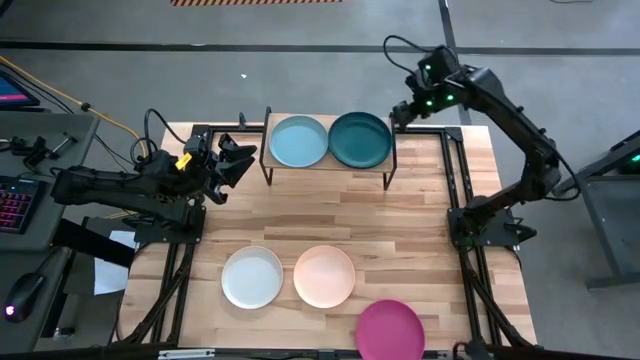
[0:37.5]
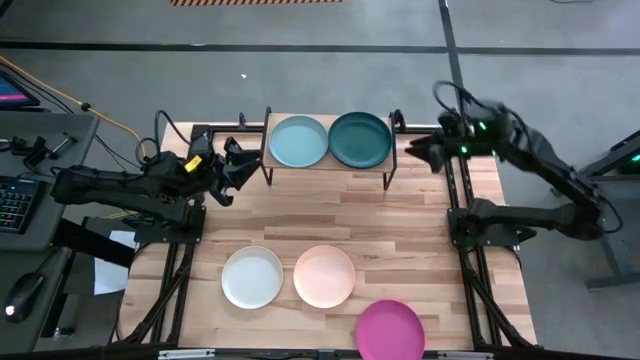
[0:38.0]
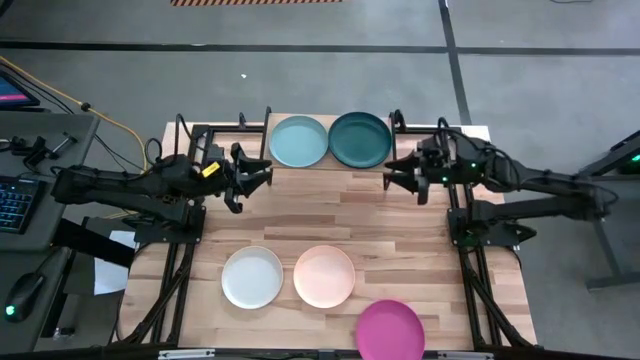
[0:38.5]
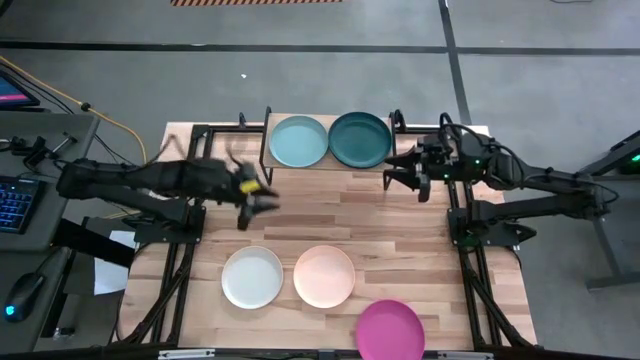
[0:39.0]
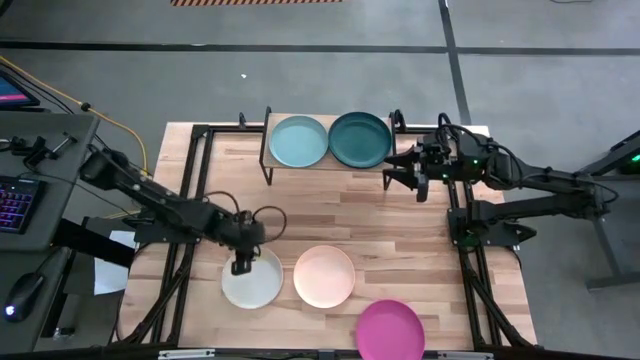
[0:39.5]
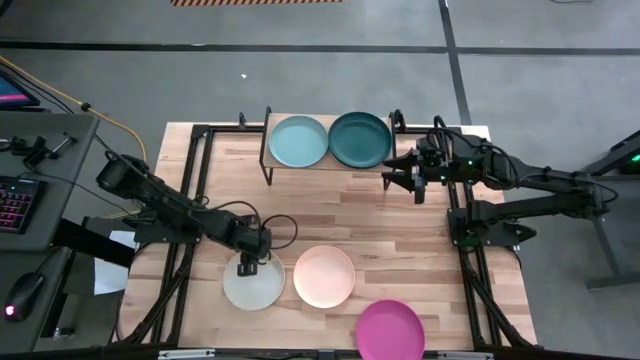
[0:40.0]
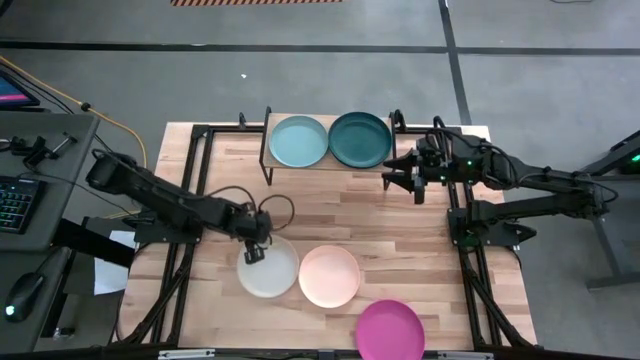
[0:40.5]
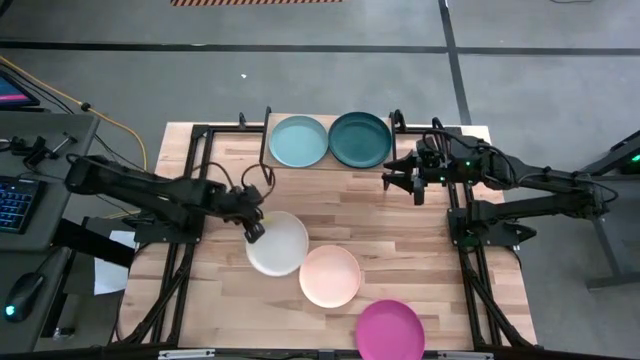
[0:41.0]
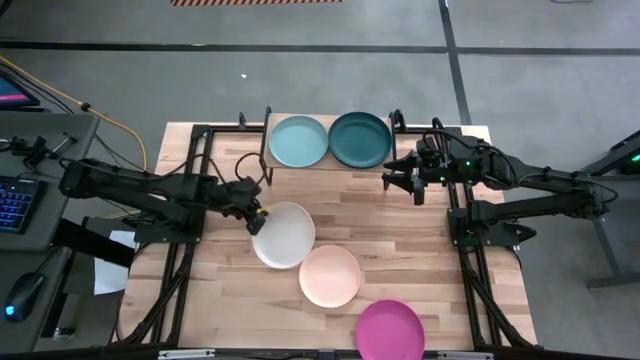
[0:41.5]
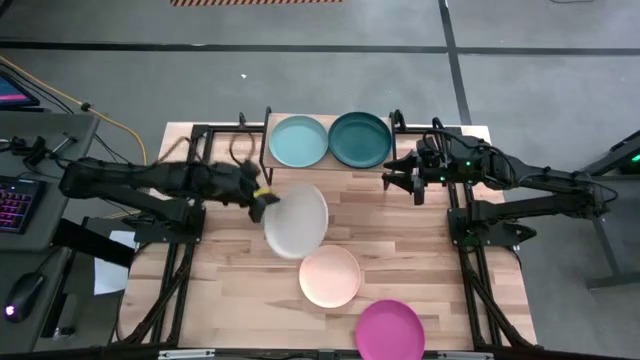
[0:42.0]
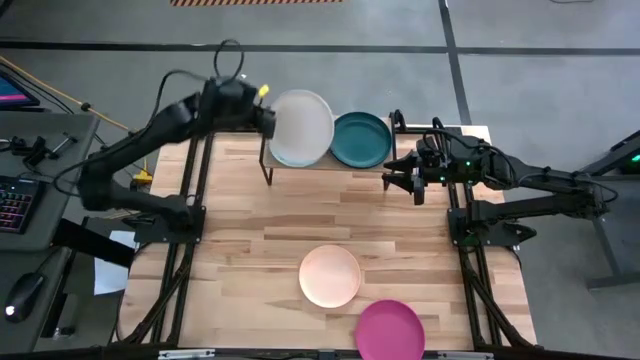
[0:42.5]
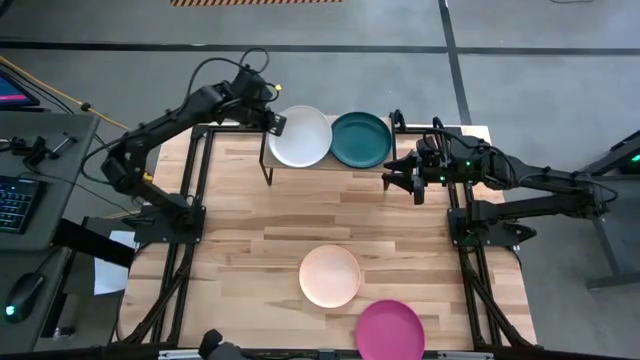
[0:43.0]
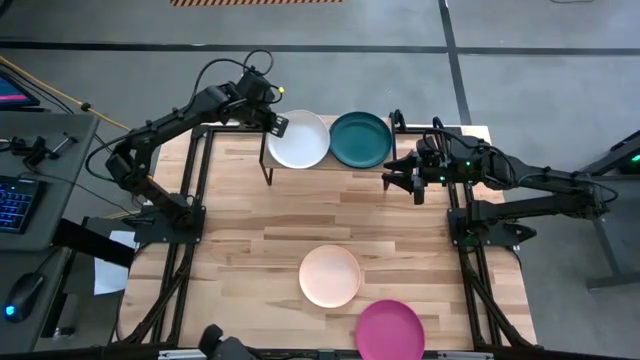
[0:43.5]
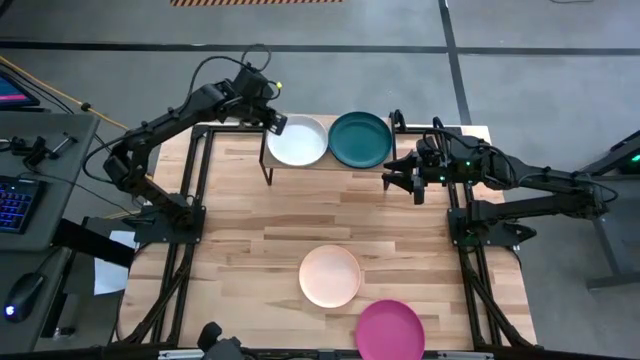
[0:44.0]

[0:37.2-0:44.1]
Task: Place and stack plates onto a shelf
Stack the white plate on top of the blue plate on the shelf

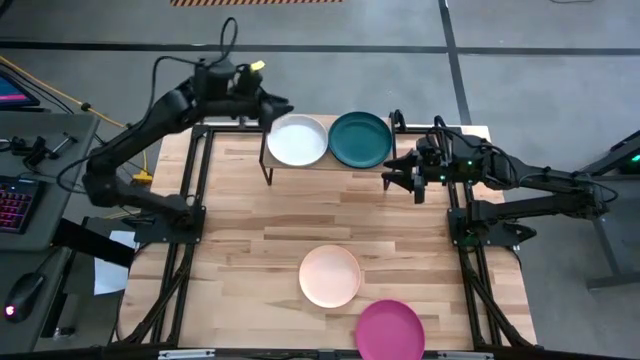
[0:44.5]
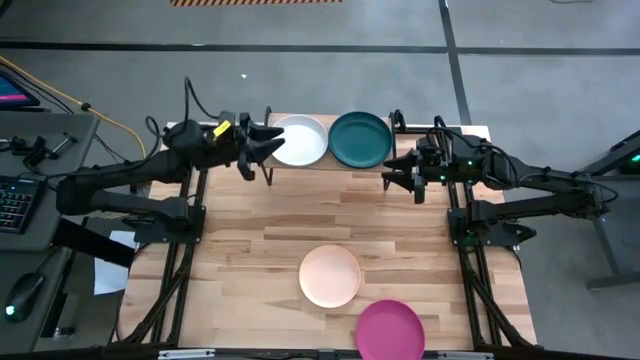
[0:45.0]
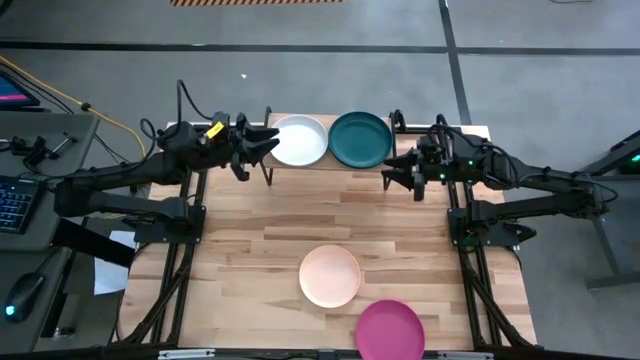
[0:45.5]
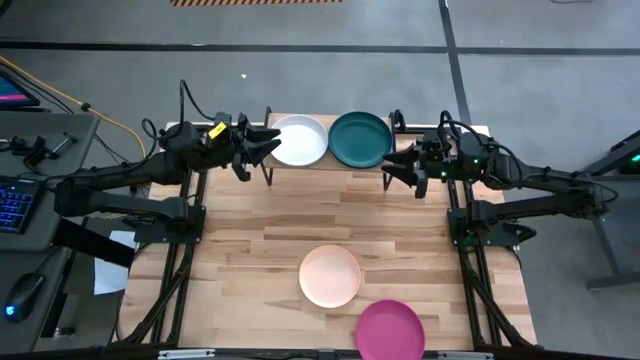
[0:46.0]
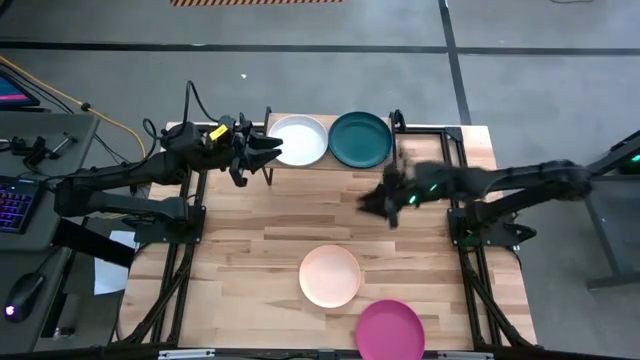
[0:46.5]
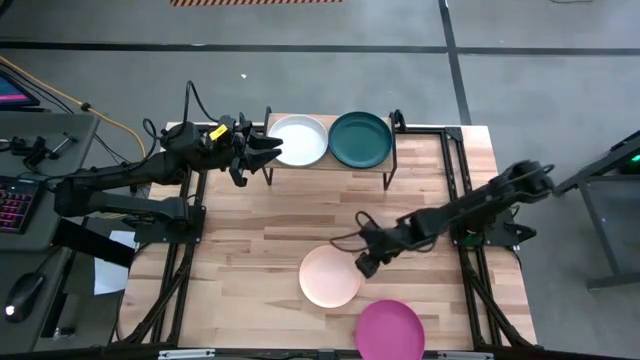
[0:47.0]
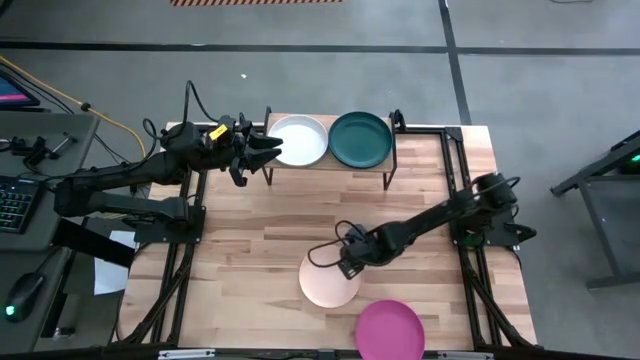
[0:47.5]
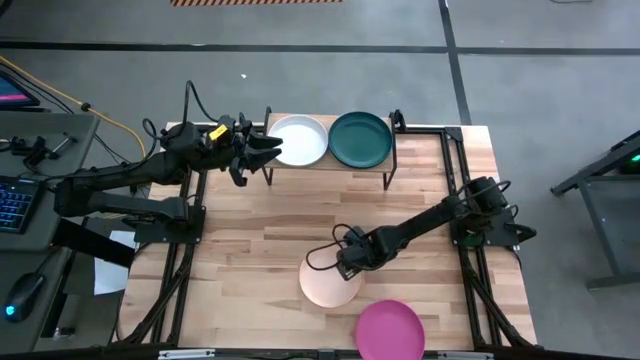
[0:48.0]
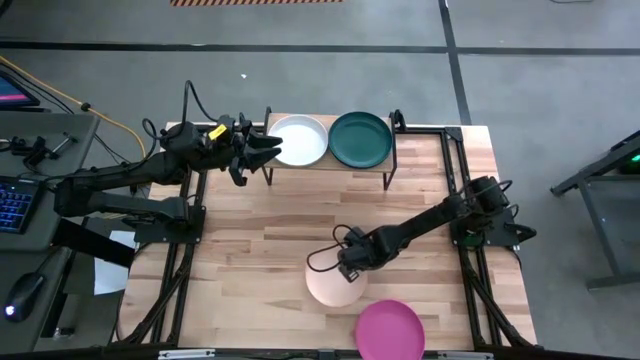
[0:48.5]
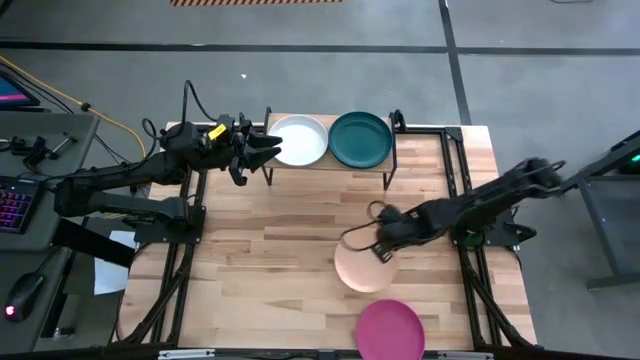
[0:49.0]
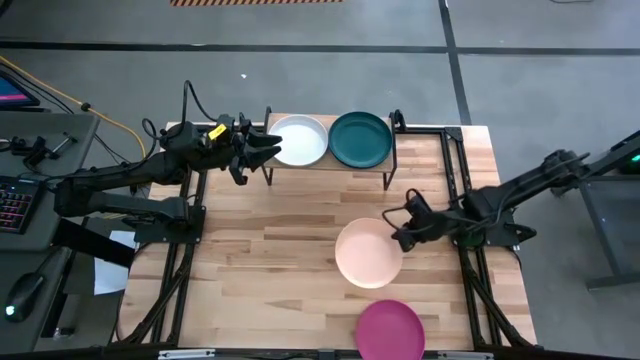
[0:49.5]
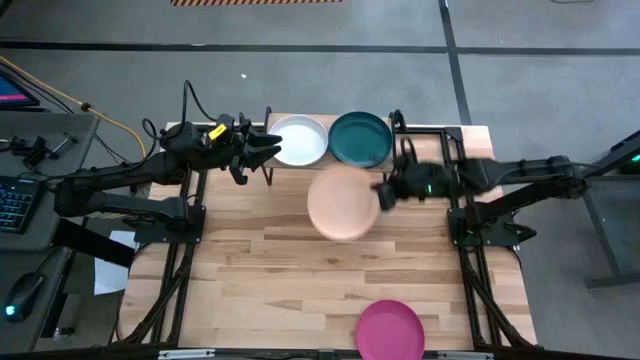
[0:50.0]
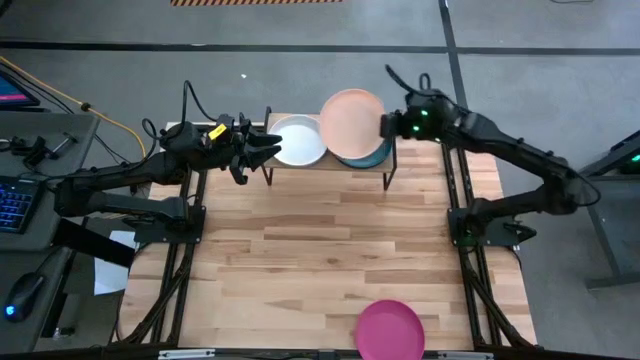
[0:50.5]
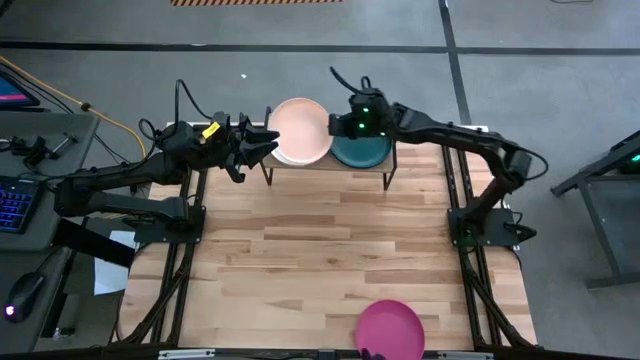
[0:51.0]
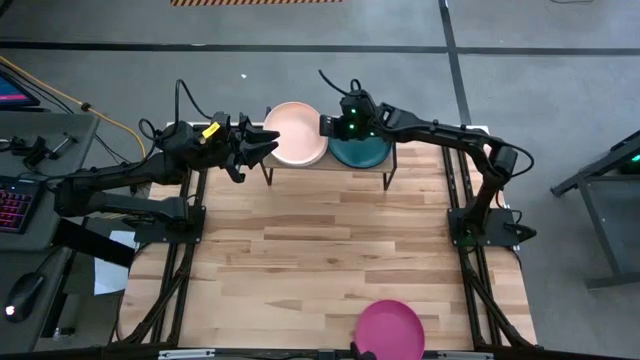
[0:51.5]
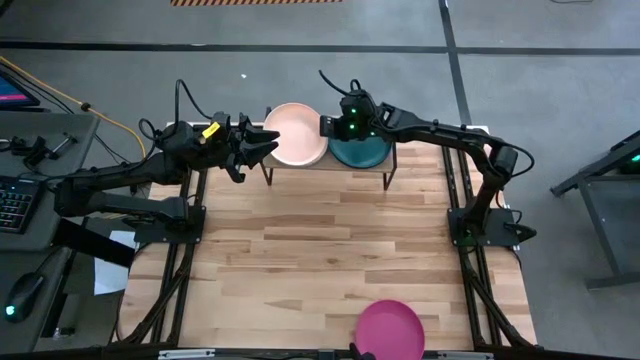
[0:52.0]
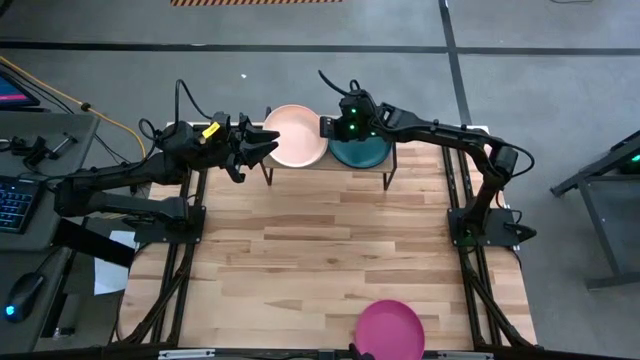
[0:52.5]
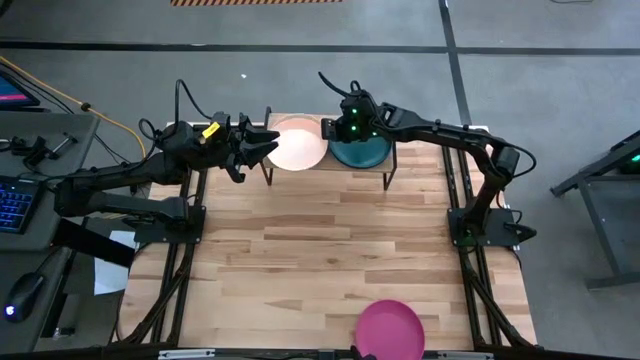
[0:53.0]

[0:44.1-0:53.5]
Stack the light pink plate on top of the white plate on the shelf

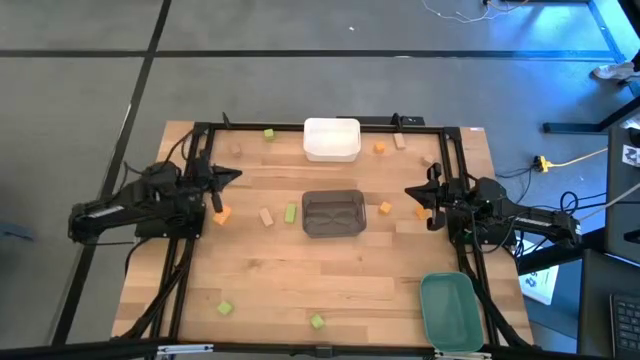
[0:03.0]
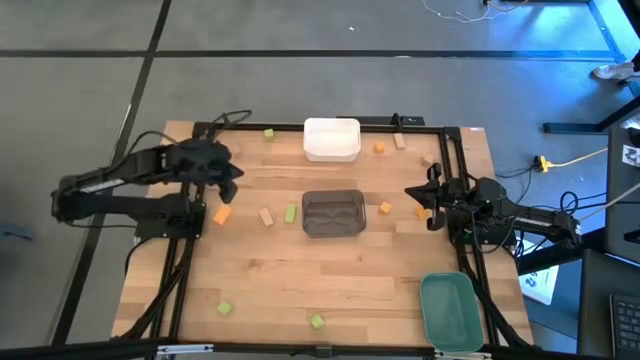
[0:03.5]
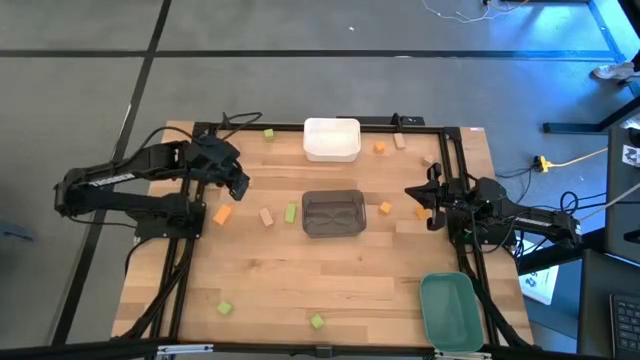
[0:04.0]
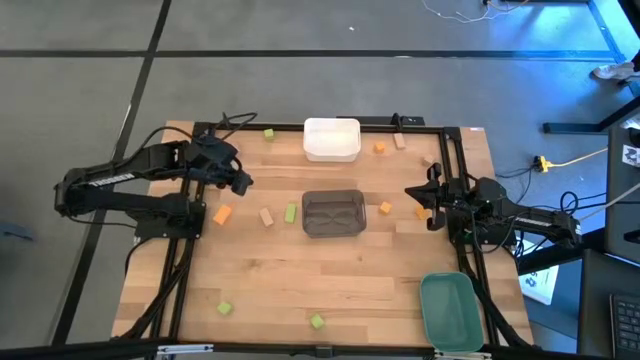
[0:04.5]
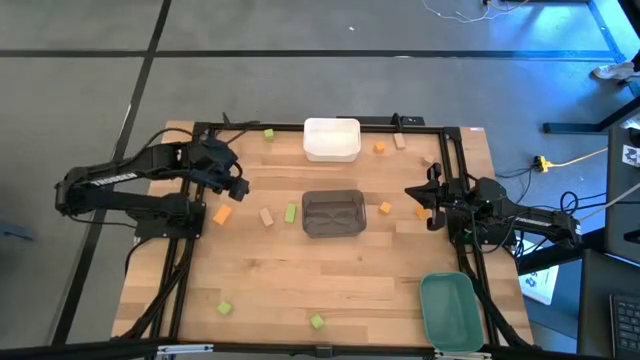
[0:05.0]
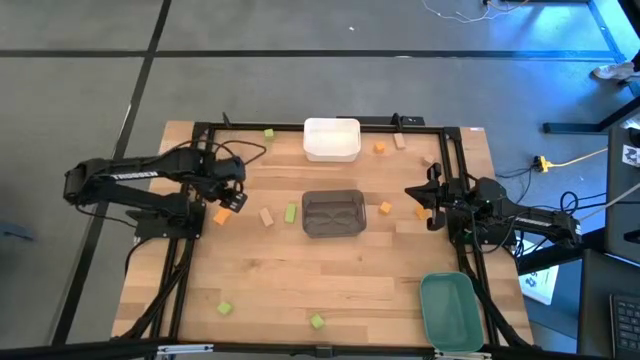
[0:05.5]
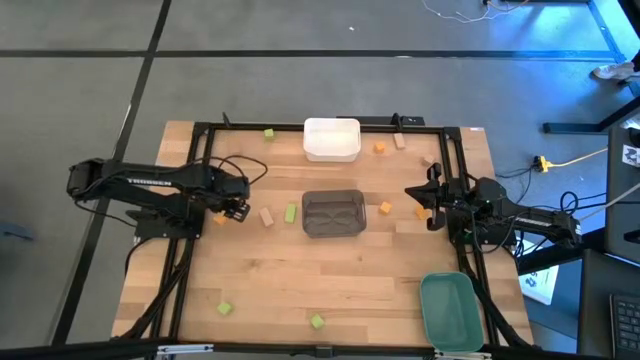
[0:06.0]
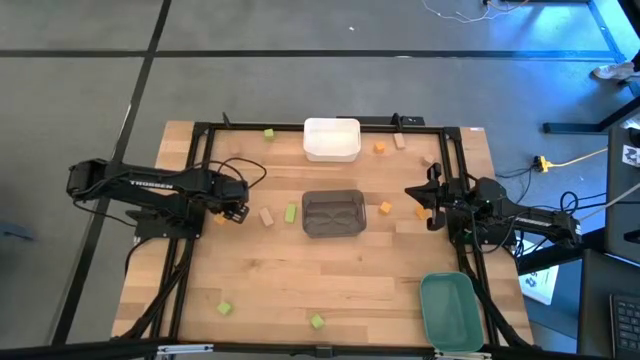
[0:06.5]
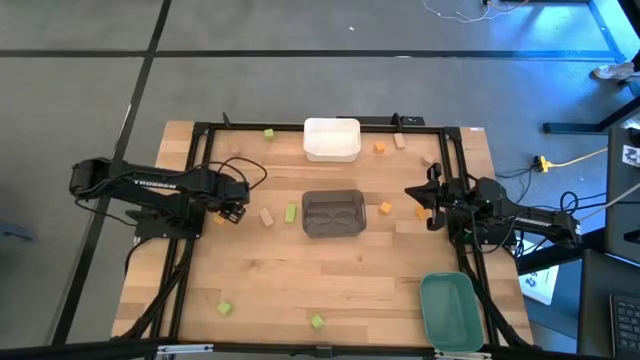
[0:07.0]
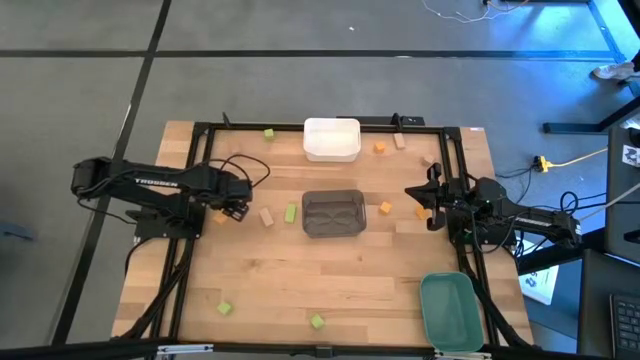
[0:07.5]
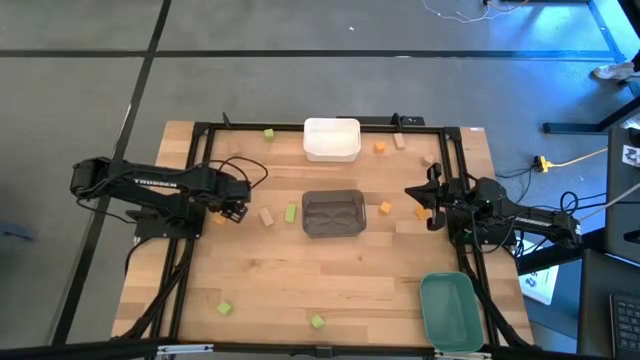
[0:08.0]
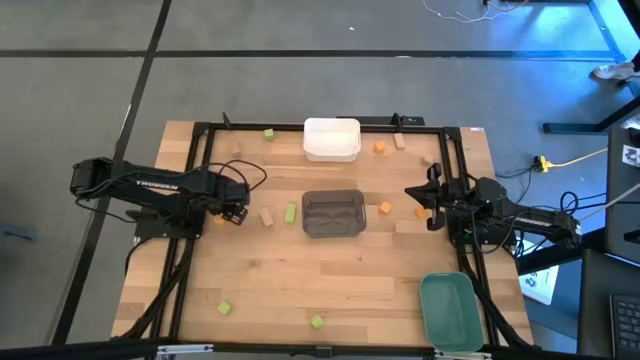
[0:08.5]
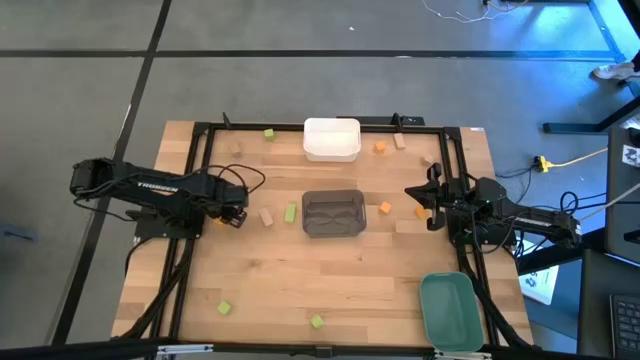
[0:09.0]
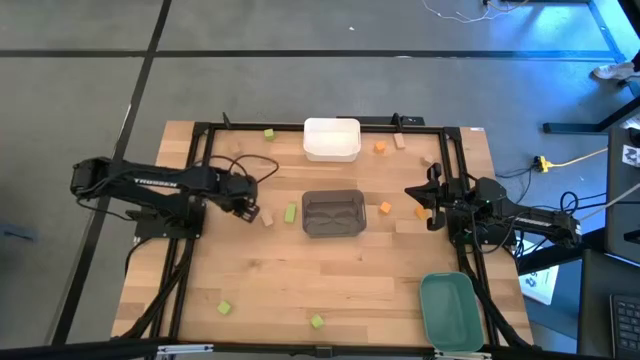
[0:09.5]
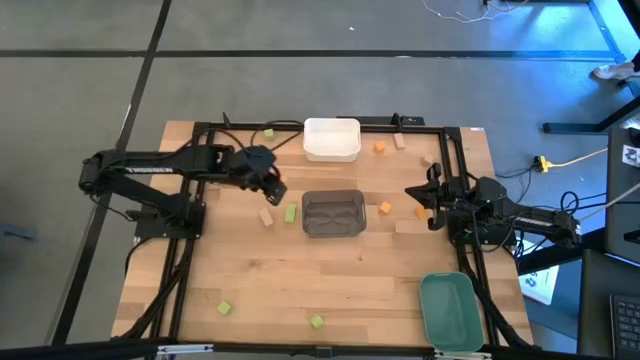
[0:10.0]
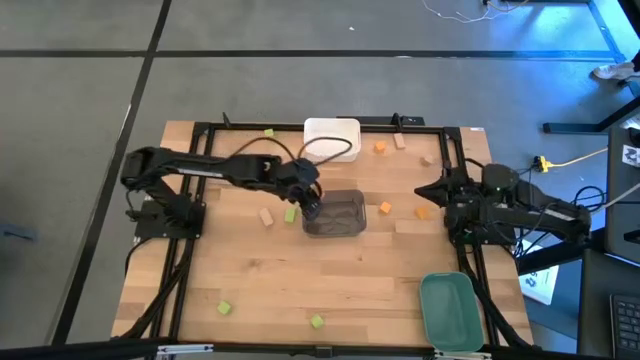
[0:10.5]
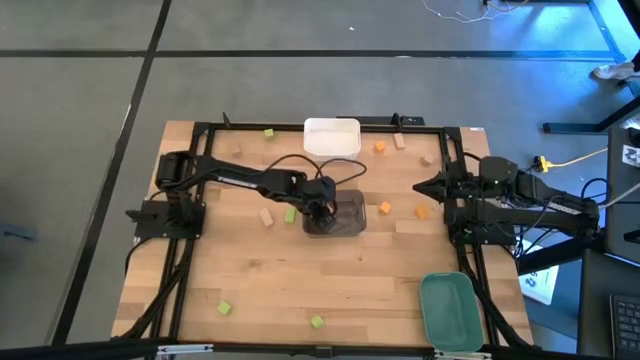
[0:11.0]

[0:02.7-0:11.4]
Task: Sort & place blocks by color
Put the orange block into the black bin
